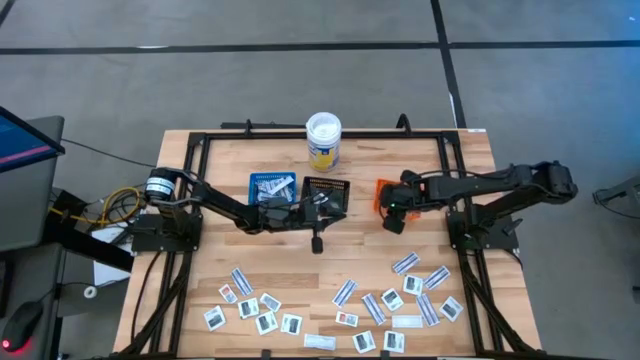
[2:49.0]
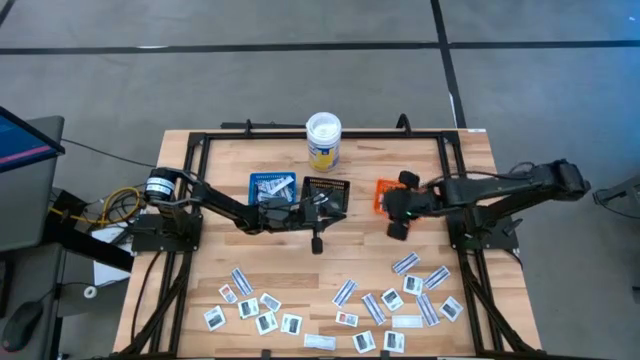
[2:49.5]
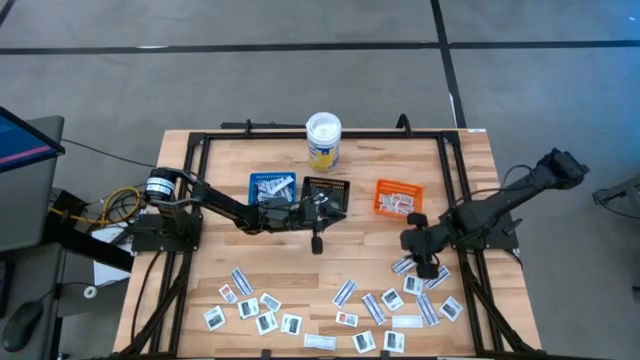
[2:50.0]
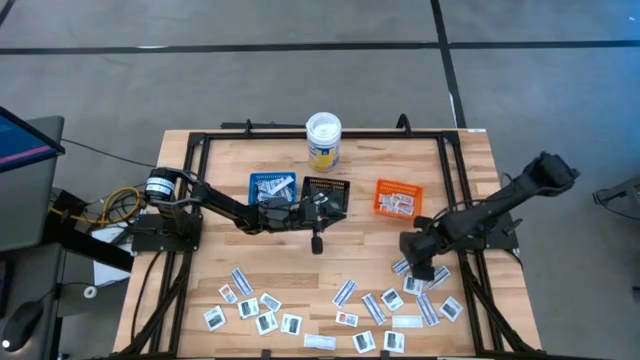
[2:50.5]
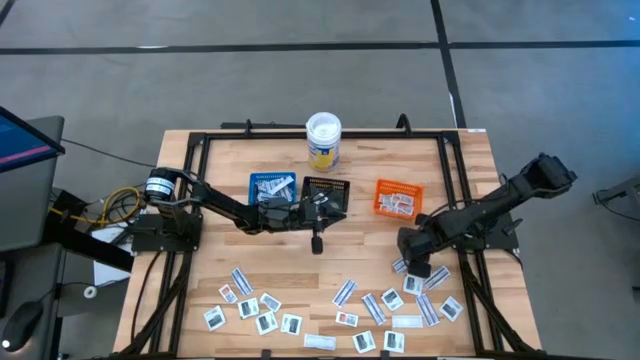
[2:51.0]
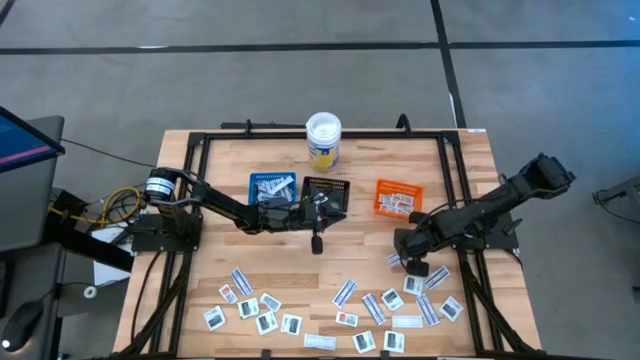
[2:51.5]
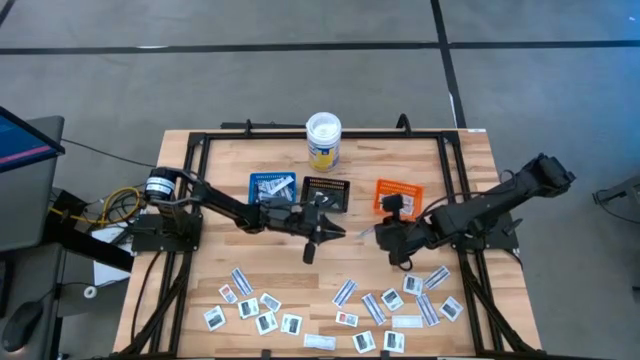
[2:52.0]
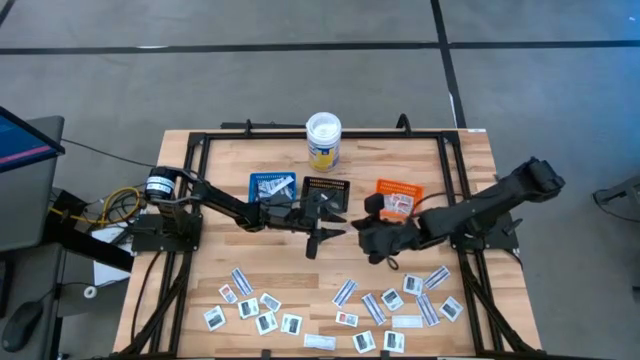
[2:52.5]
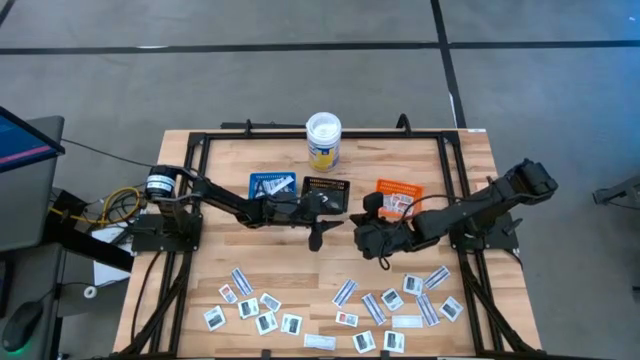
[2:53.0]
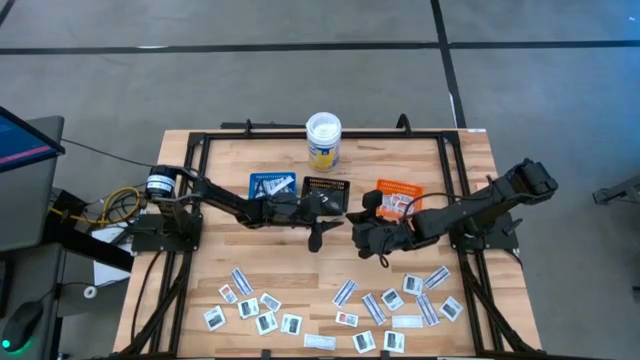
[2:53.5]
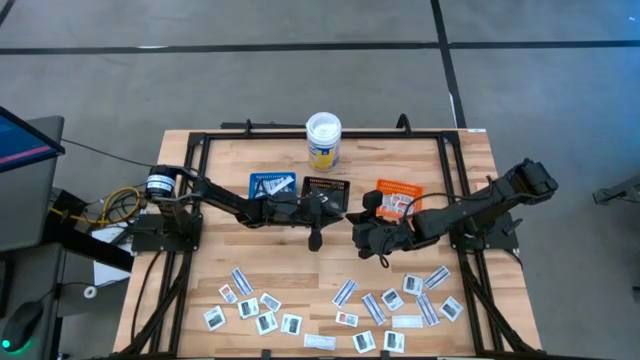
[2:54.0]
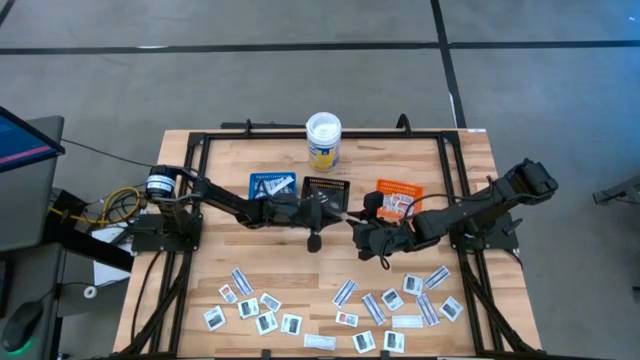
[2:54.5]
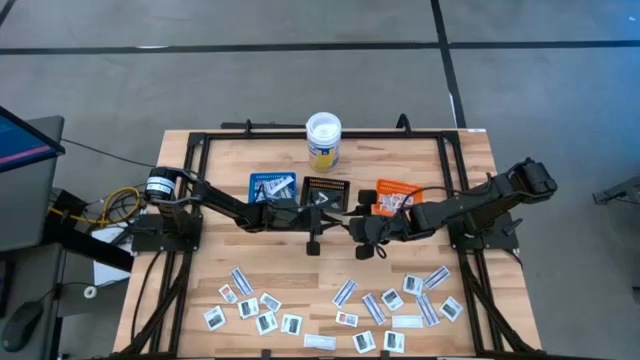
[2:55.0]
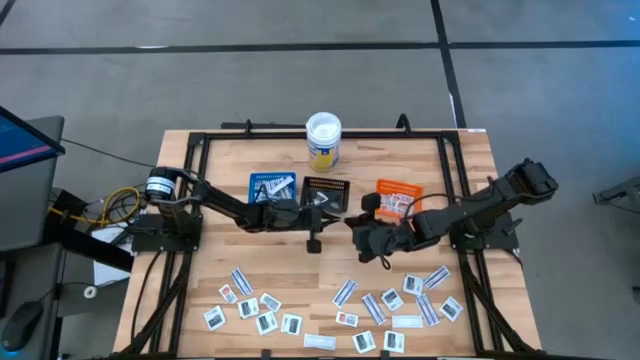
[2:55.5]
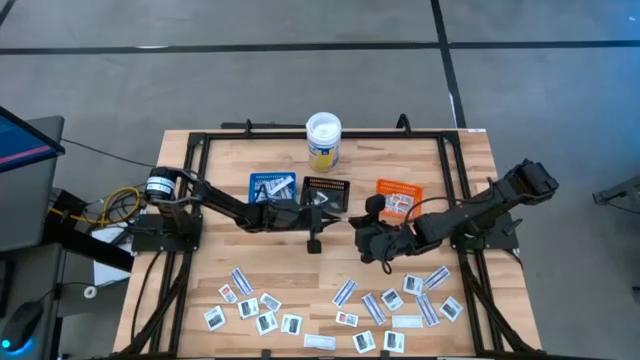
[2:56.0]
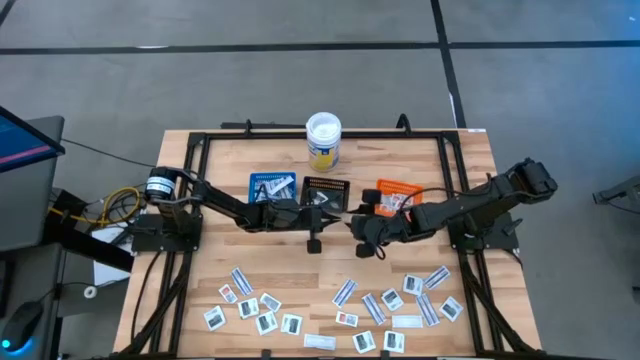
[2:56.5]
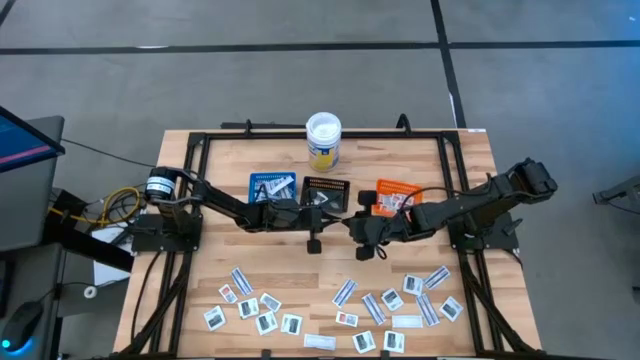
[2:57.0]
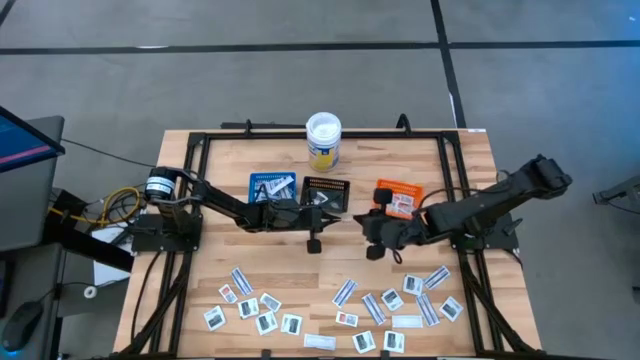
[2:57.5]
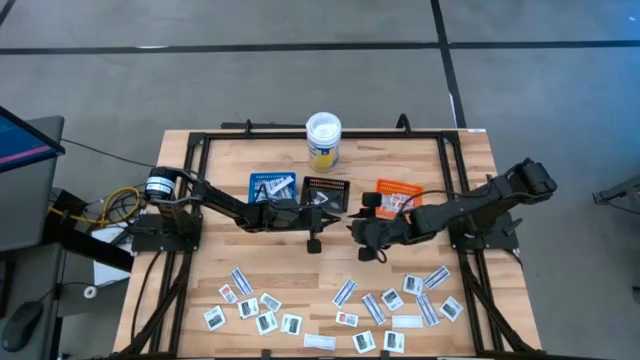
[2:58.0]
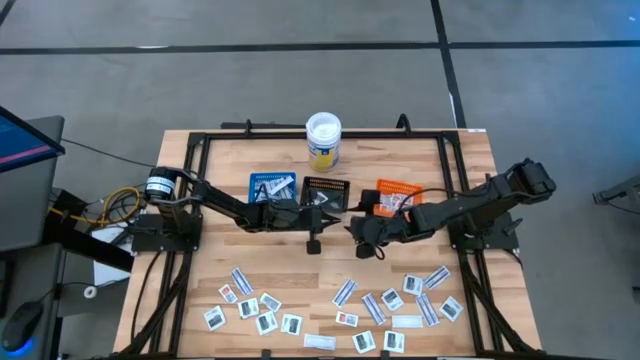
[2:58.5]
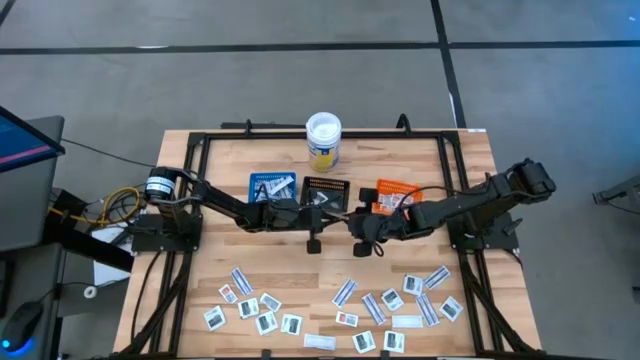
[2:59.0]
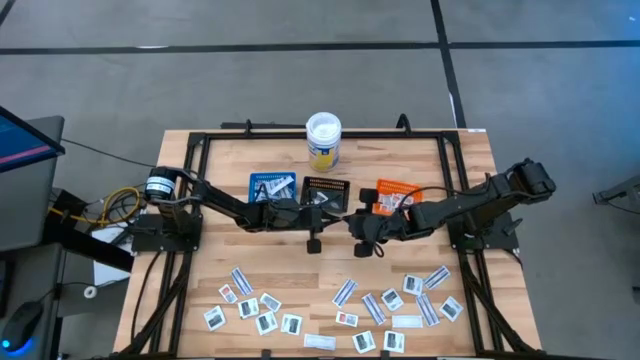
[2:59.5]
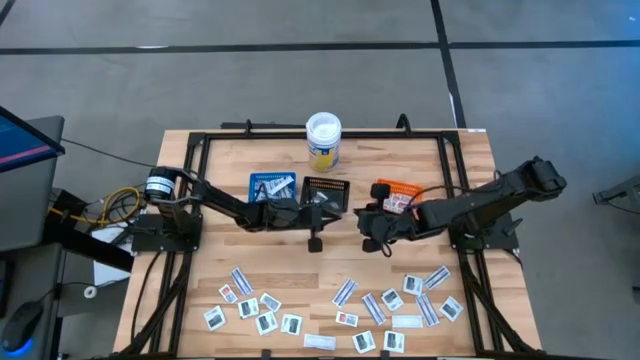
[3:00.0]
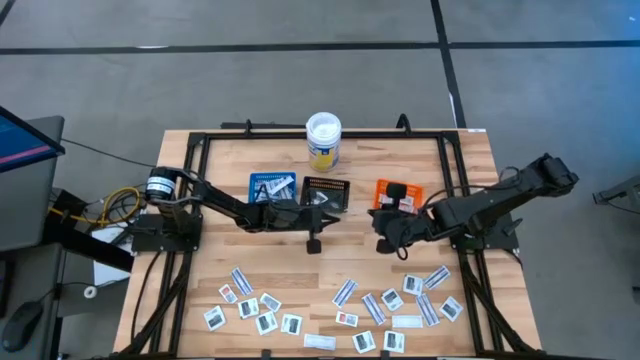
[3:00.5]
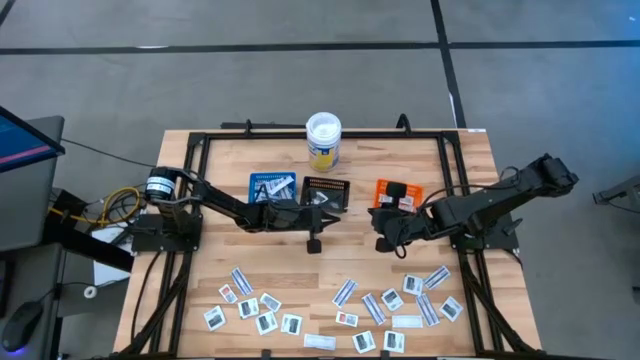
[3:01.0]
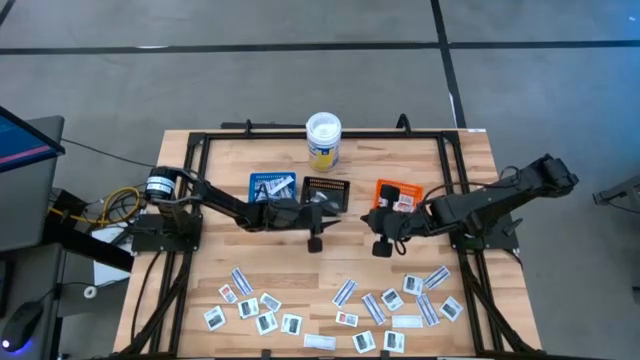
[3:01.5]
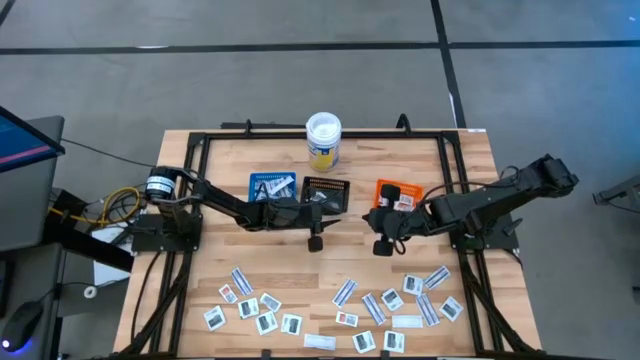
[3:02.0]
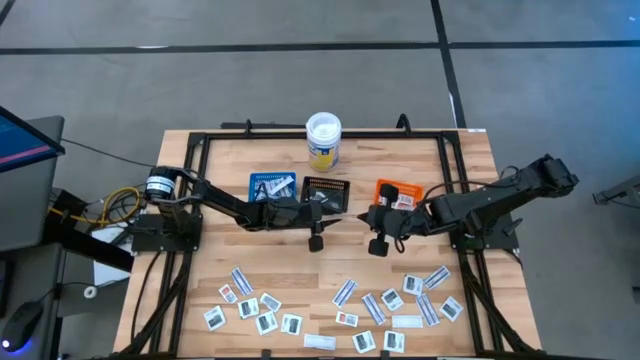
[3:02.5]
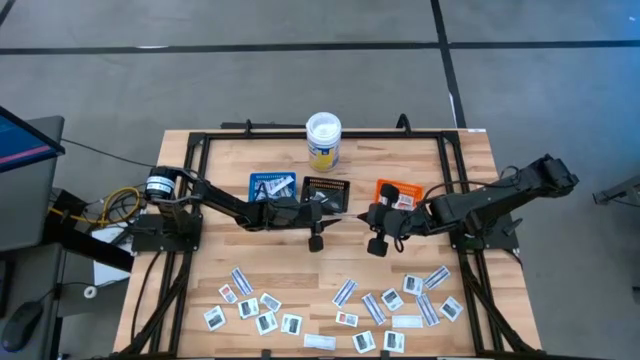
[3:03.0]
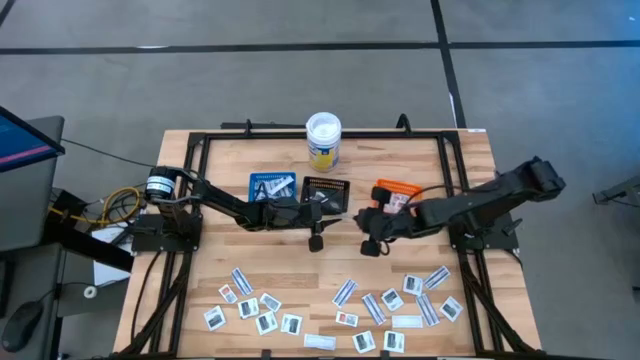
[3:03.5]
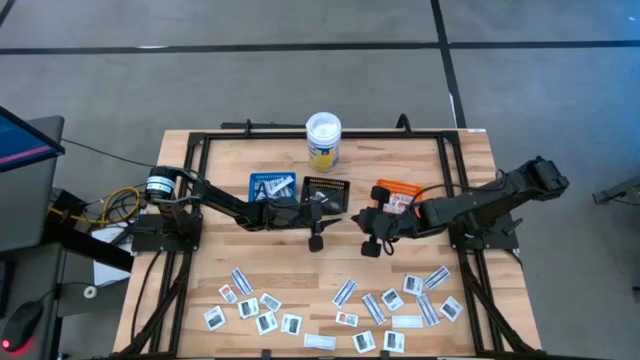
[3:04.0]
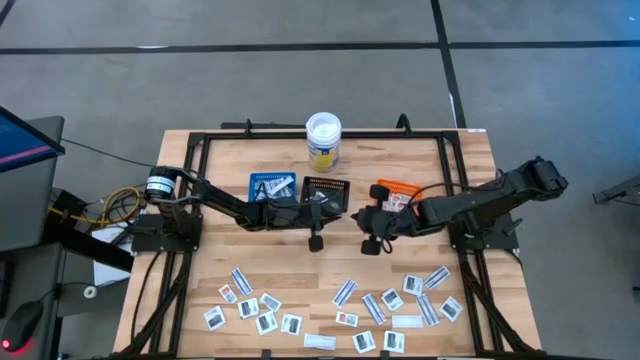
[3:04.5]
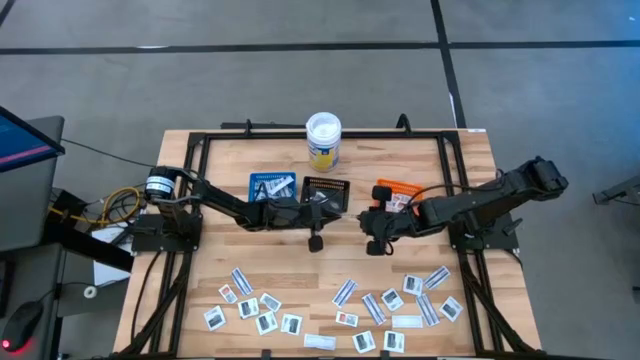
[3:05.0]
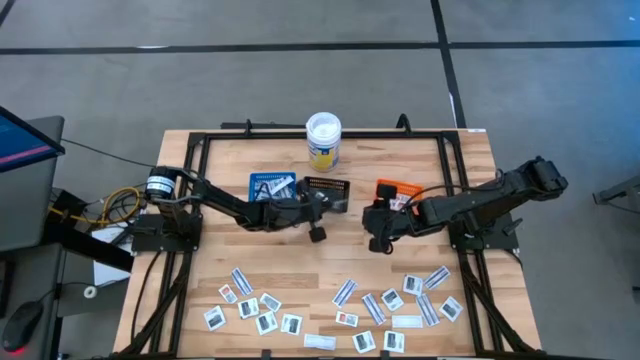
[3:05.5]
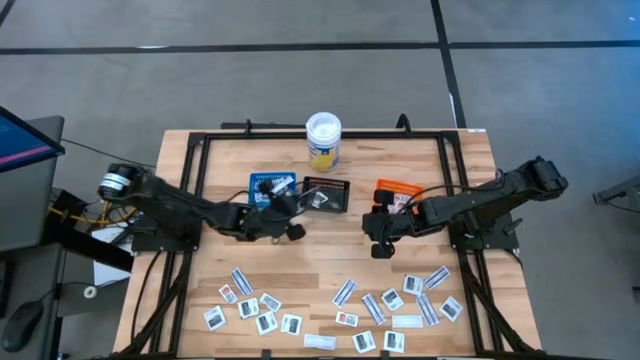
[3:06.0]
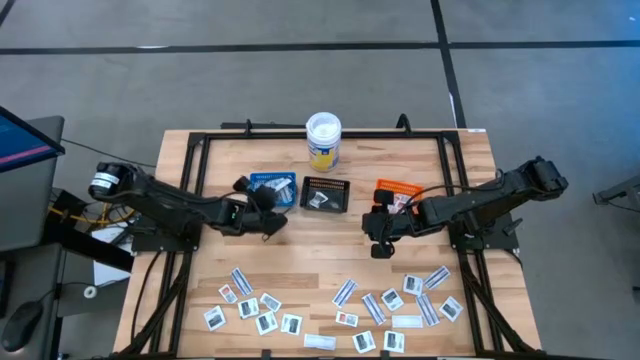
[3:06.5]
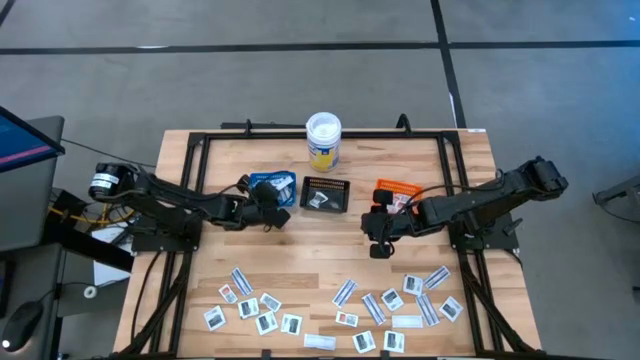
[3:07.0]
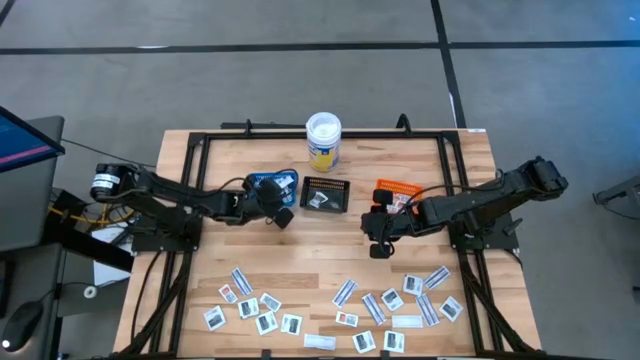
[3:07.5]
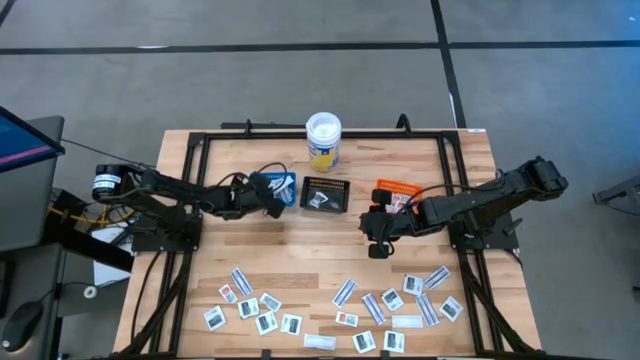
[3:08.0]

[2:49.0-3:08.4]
Task: Pick & Place First Aid Supplies
Put the blue bandage into the blue bin

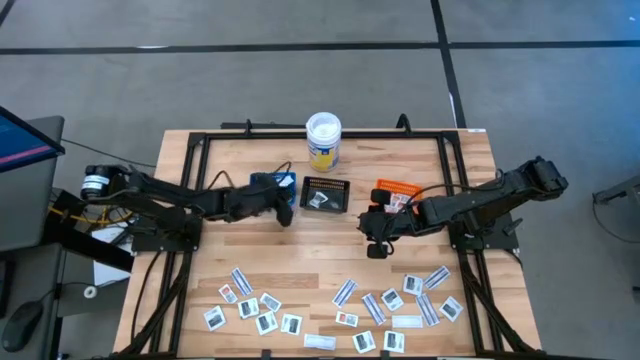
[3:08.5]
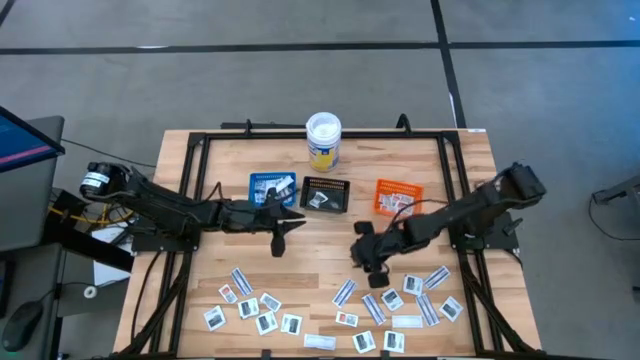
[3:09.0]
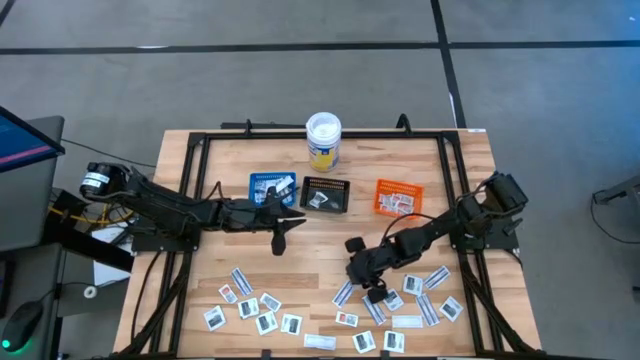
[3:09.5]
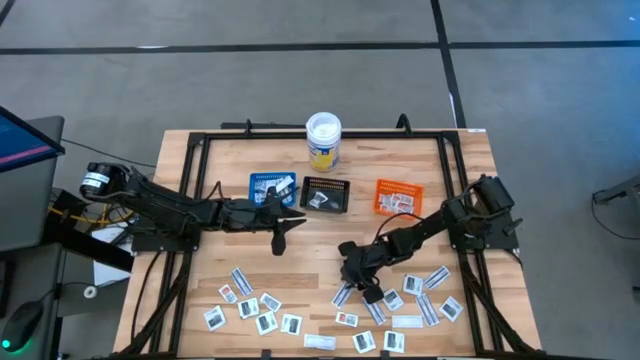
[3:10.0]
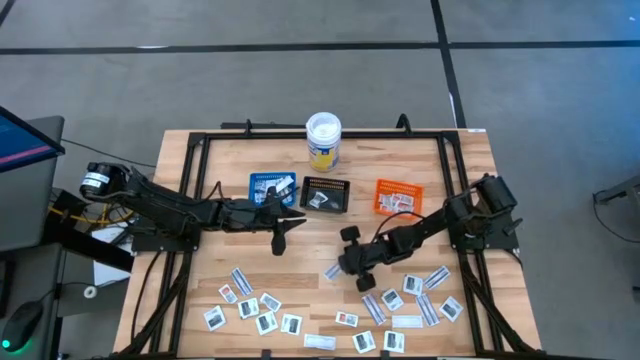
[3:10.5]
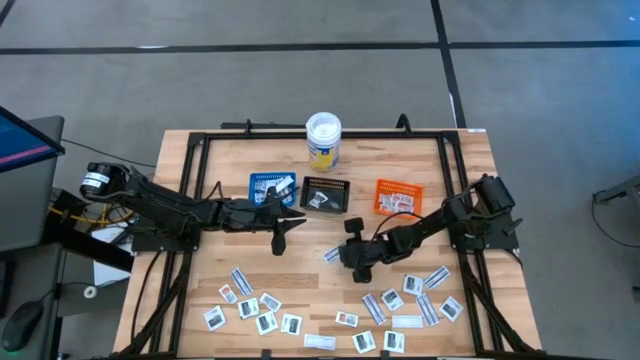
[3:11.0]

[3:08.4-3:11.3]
Put the blue bandage into the blue bin
